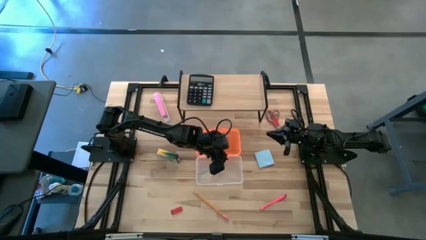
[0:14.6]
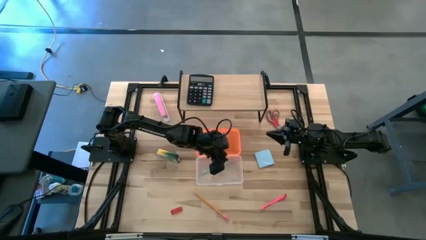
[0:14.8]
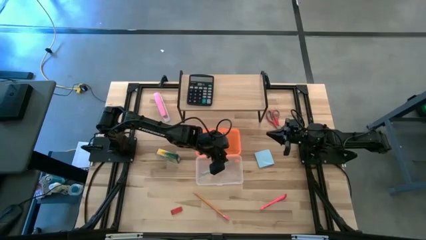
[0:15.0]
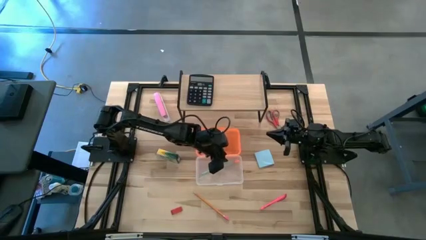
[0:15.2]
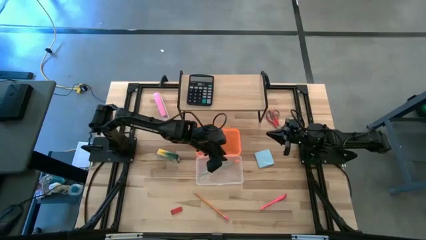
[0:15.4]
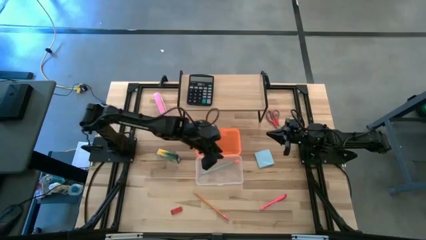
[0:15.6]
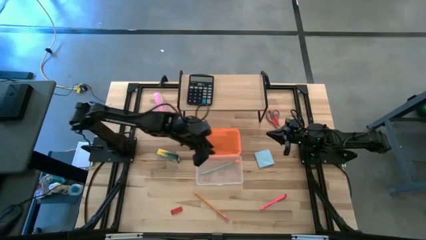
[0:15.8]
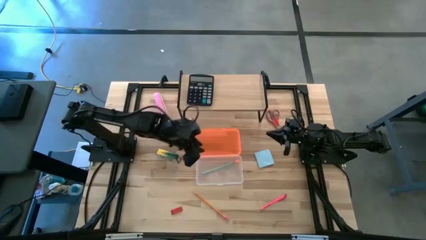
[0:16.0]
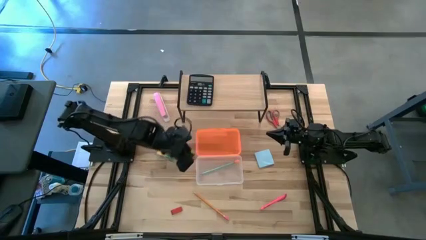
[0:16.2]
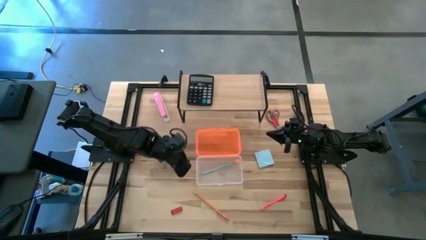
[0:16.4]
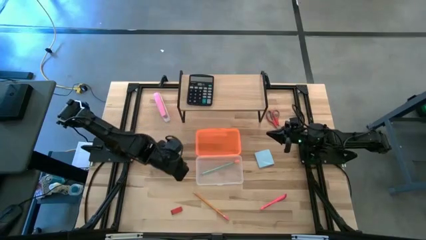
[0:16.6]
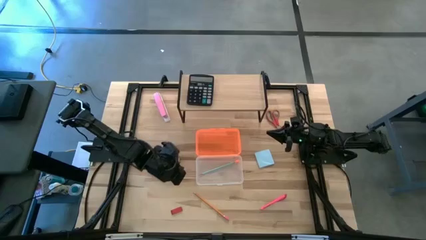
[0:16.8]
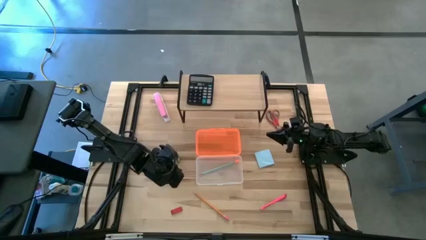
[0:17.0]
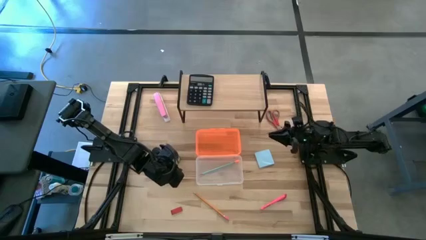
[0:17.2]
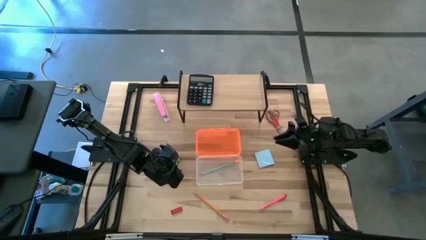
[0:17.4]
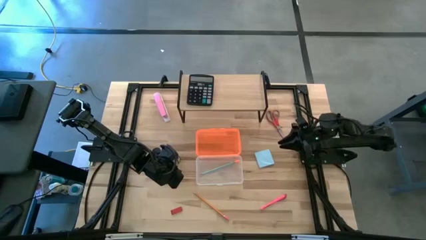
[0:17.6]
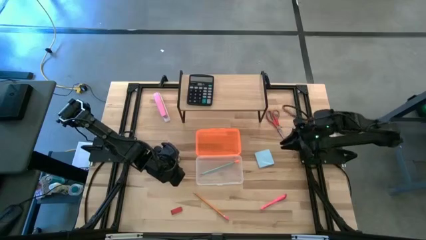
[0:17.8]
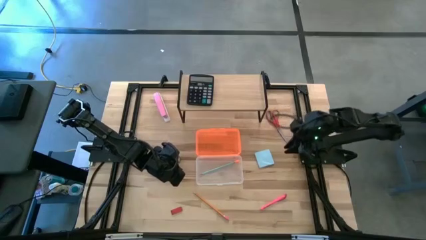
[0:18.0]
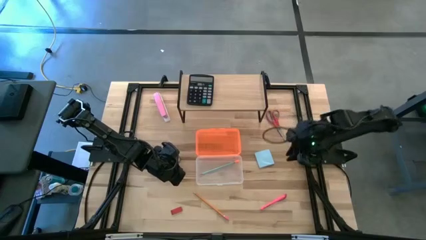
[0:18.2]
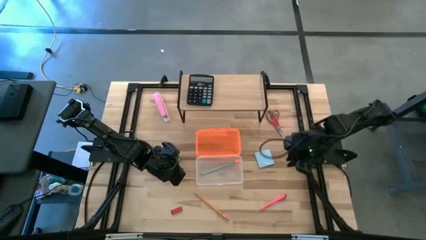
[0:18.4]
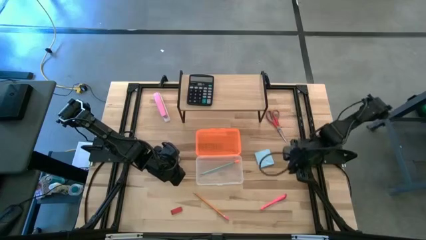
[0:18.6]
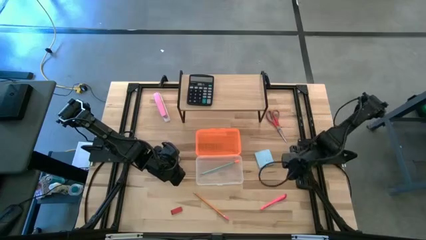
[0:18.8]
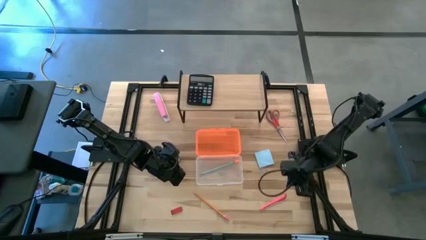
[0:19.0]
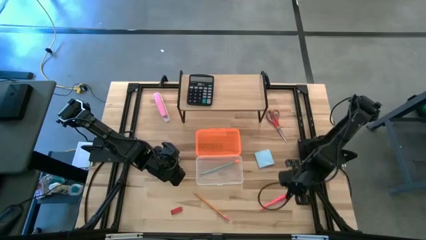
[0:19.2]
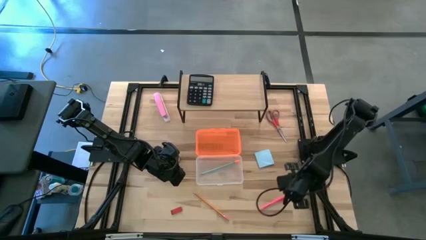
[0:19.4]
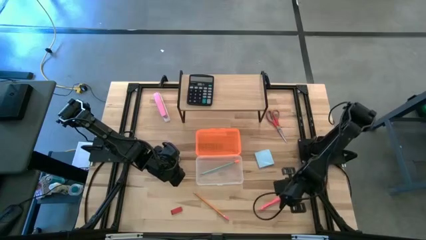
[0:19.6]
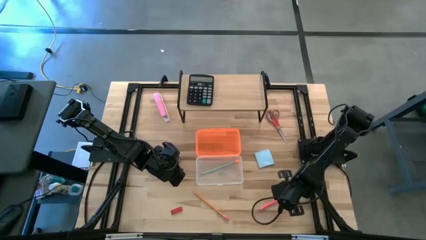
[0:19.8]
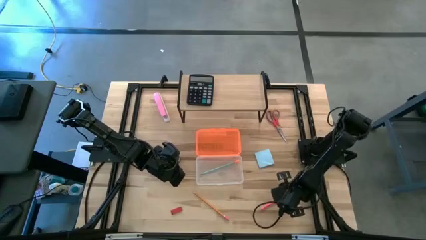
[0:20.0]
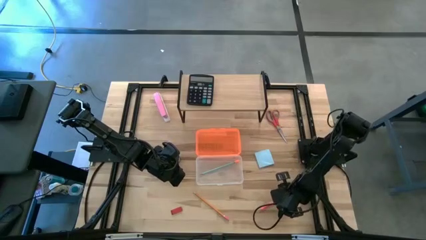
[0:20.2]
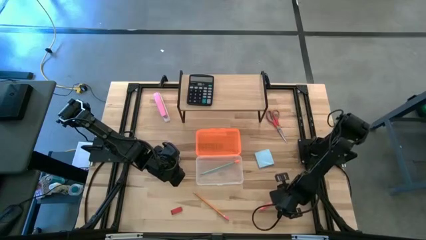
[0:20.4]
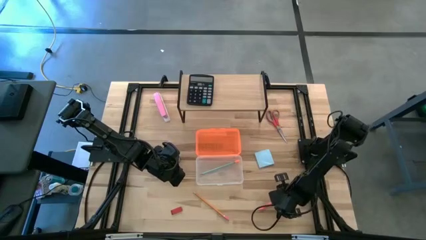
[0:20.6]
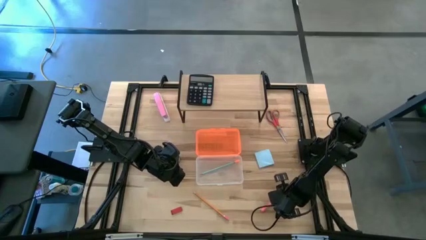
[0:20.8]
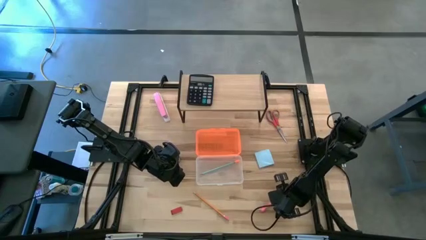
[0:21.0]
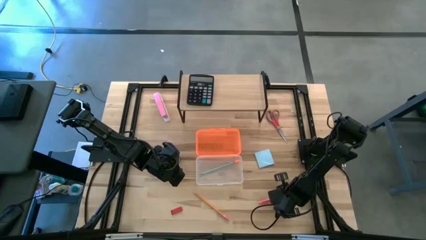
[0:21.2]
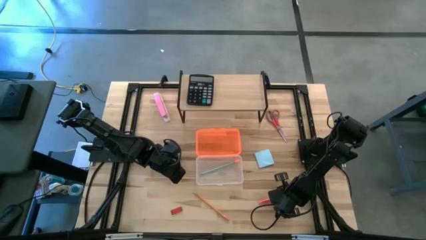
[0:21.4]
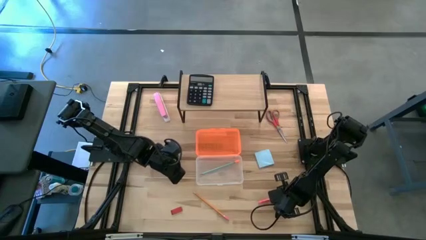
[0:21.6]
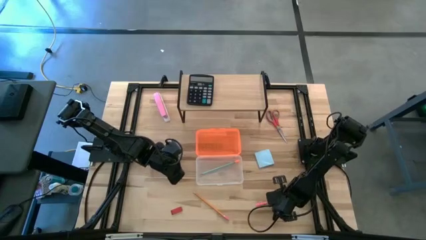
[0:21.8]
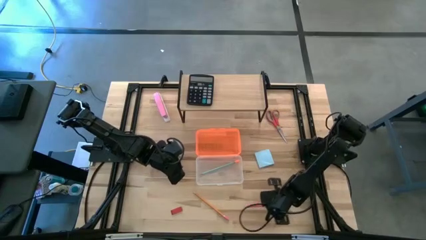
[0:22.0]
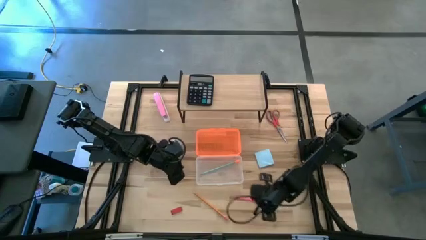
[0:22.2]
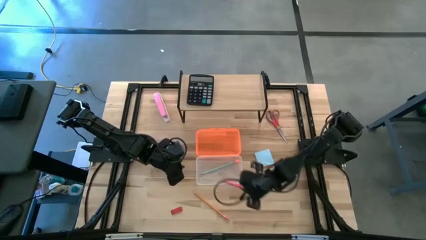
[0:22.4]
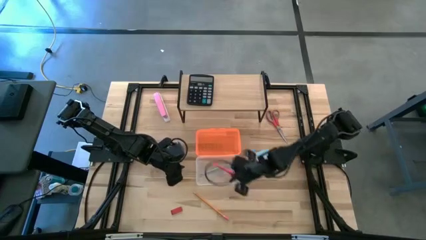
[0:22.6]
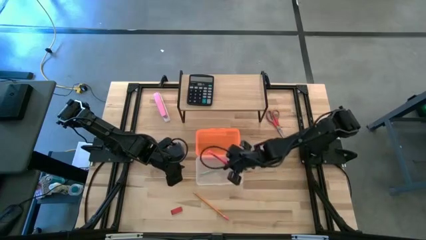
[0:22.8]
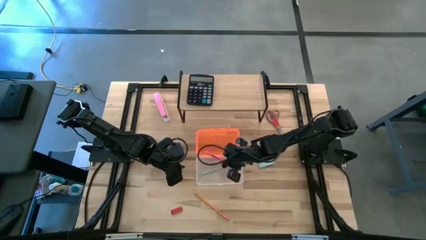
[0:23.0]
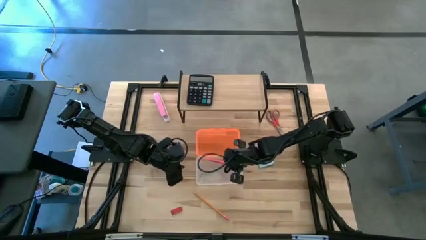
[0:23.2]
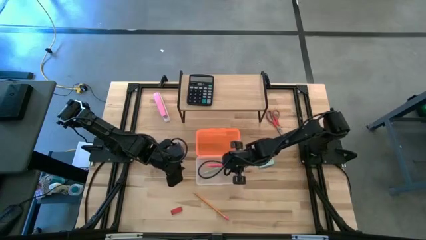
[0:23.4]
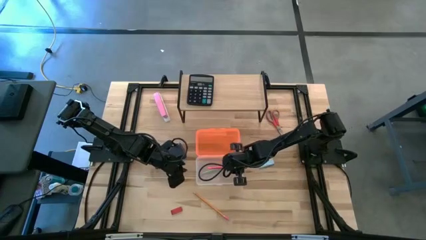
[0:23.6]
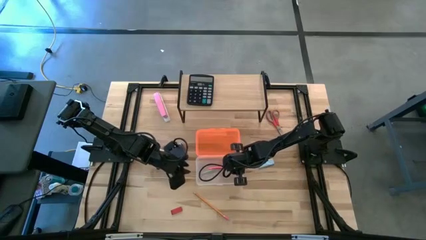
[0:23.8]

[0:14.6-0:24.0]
Task: Pack school essentials
Put the pink pen into the orange supply box

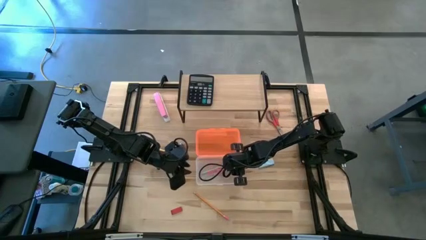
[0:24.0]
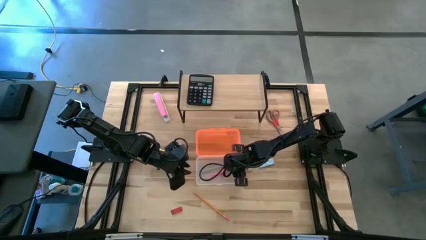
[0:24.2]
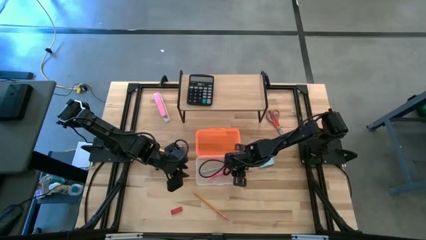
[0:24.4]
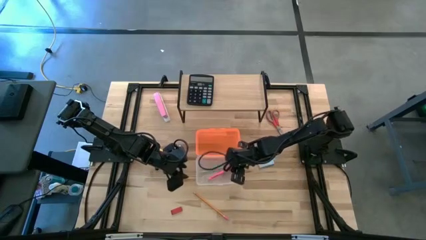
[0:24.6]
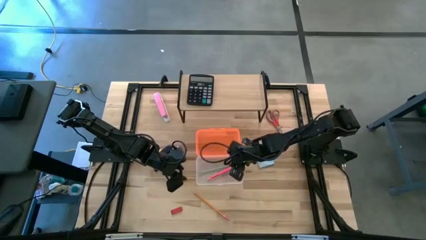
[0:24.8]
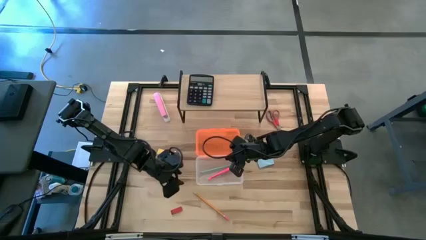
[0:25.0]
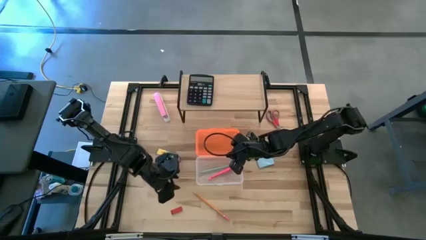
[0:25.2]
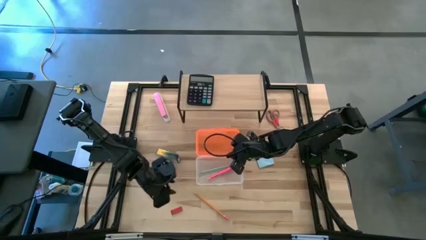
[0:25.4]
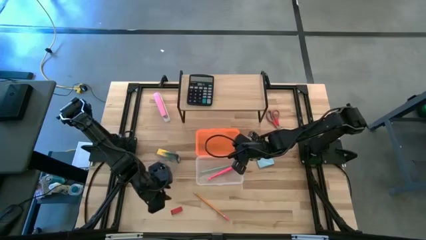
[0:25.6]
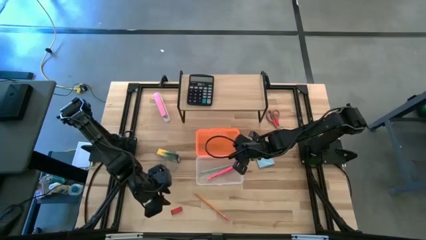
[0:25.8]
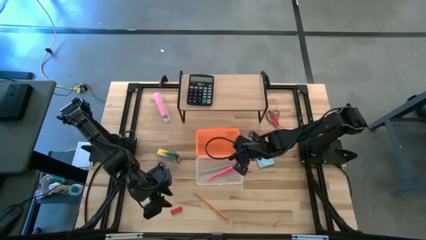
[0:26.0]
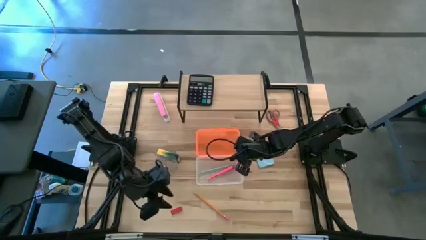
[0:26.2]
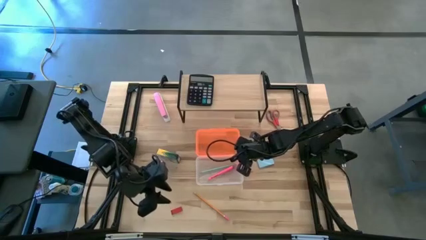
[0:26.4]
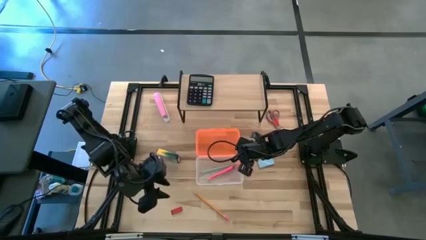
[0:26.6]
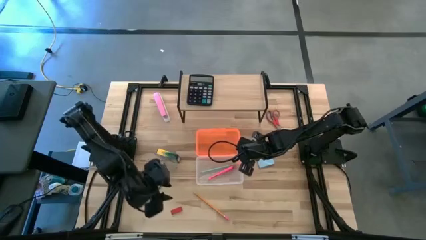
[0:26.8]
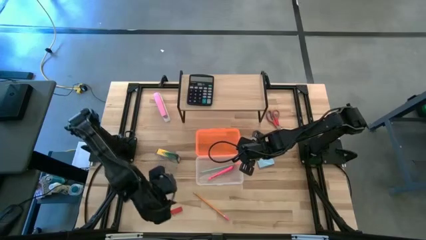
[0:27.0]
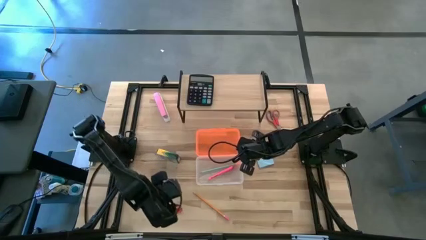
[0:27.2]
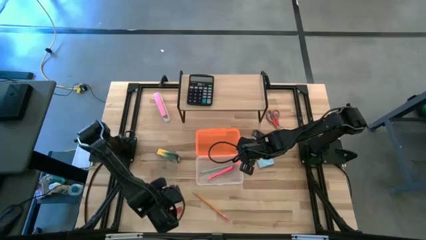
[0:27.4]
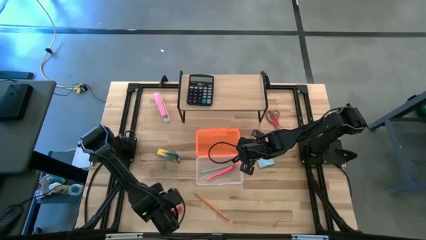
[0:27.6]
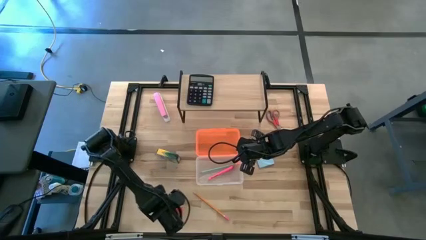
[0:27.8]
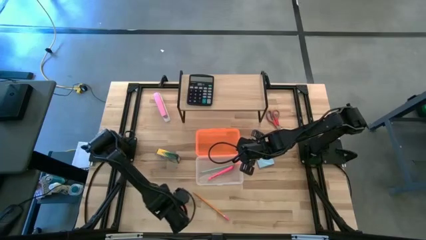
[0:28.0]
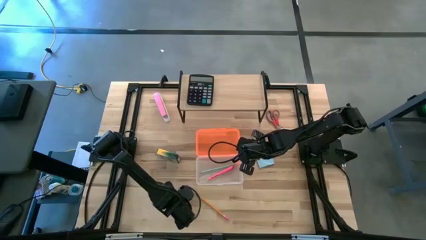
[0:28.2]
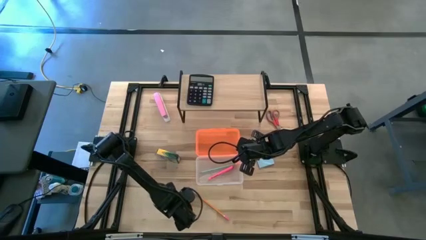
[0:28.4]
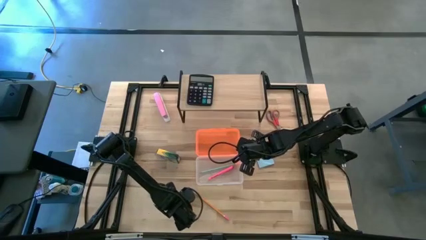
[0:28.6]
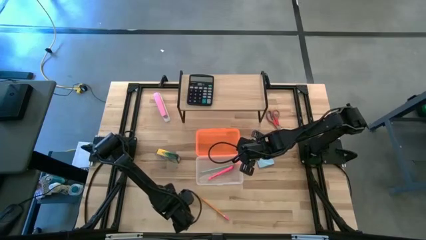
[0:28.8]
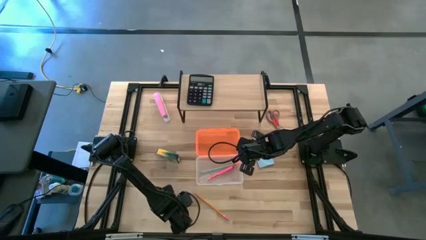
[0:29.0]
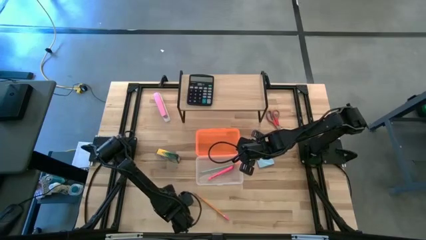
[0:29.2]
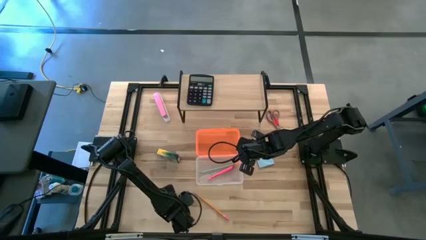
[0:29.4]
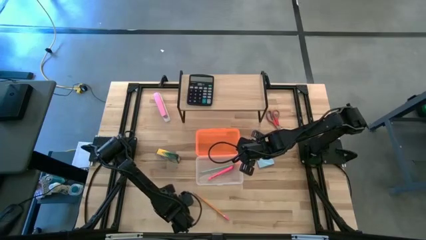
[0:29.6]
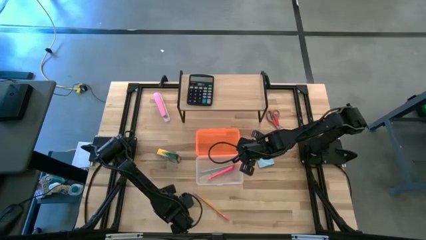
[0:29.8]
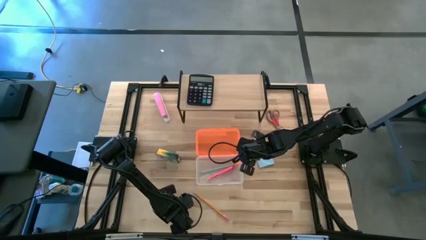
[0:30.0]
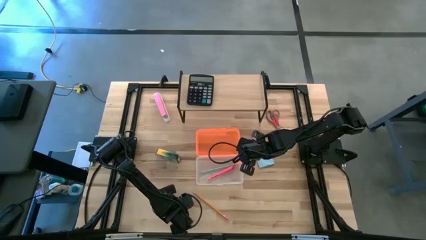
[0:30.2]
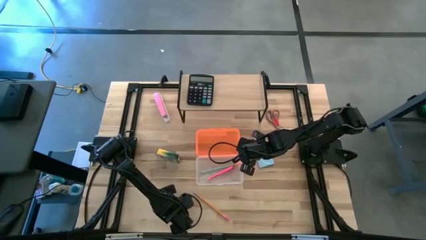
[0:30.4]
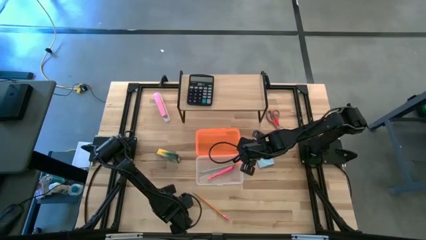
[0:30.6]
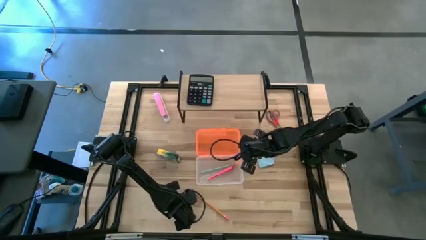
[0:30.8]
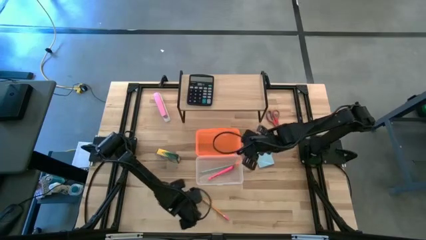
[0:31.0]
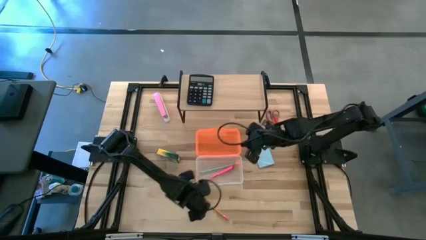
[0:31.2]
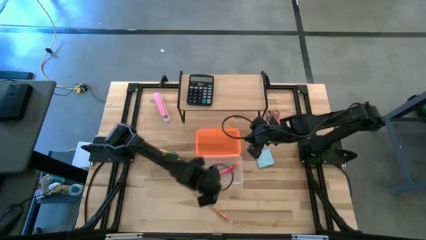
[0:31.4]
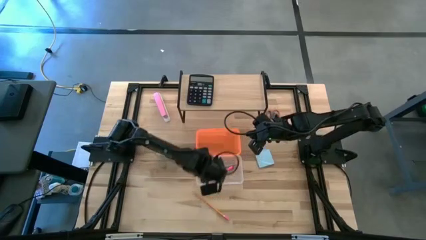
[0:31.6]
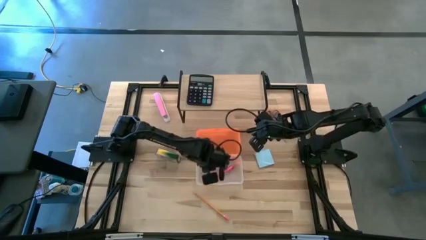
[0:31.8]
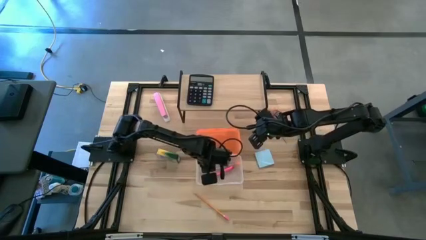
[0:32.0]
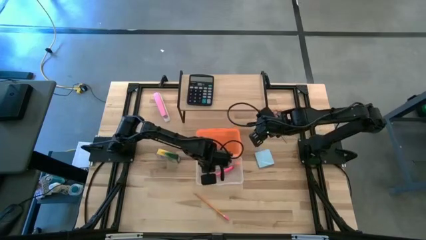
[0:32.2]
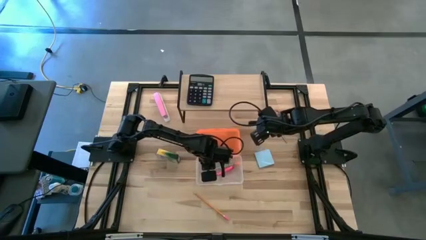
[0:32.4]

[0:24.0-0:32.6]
Put the red eraser into the orange supply box
